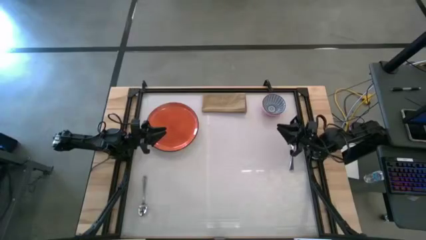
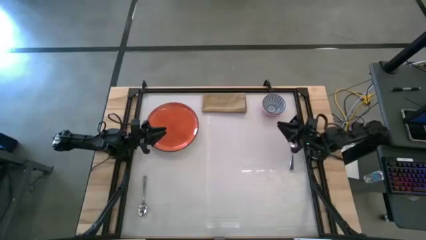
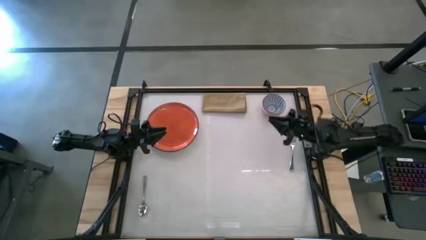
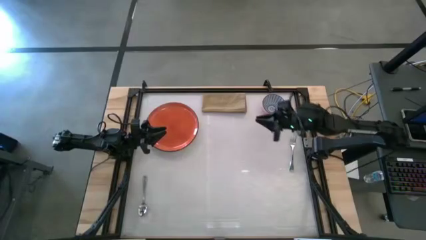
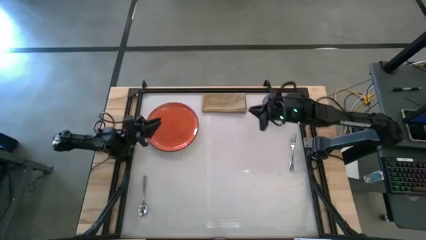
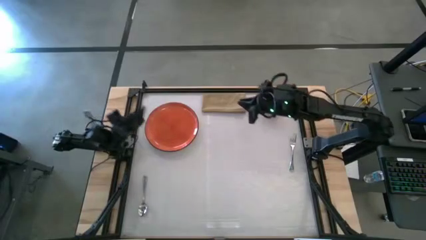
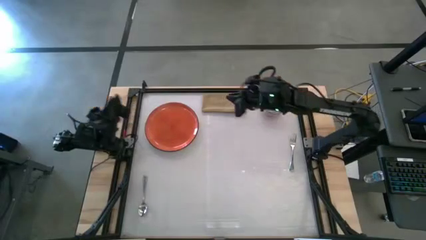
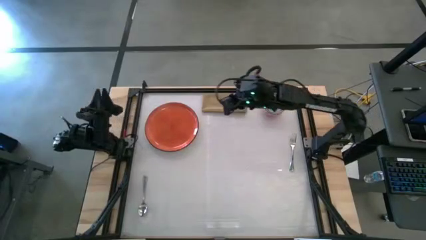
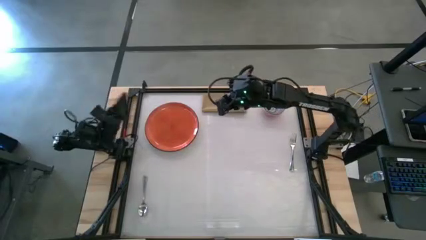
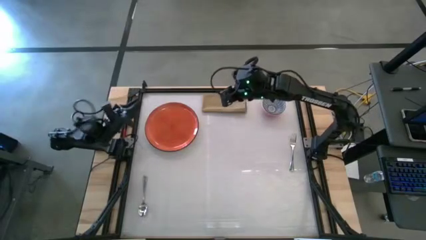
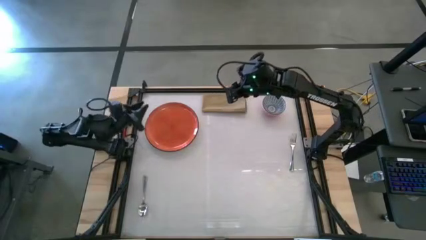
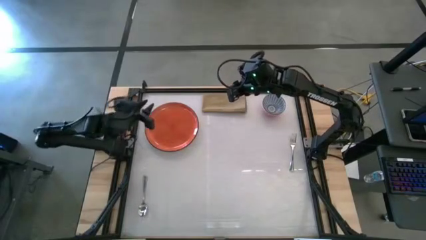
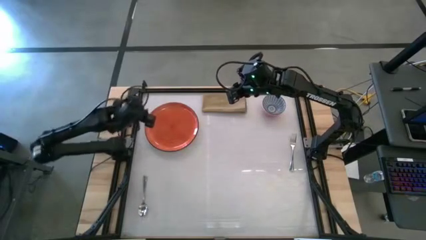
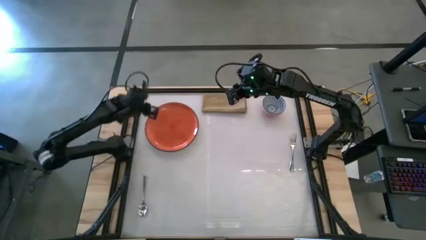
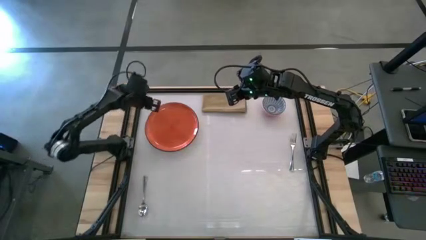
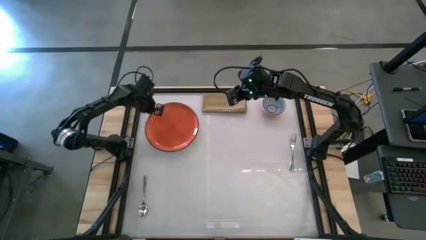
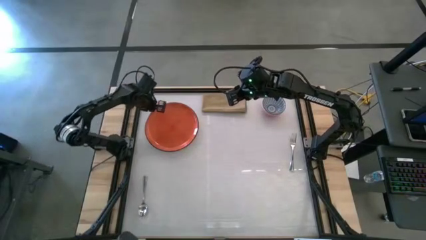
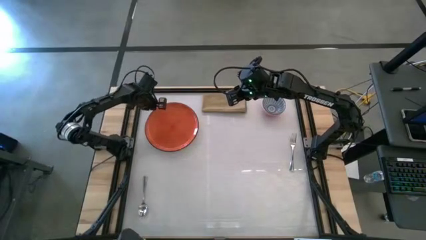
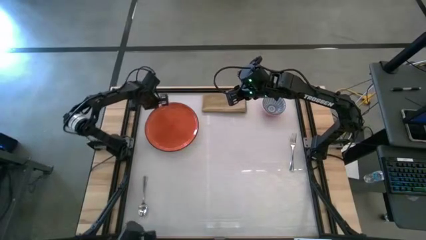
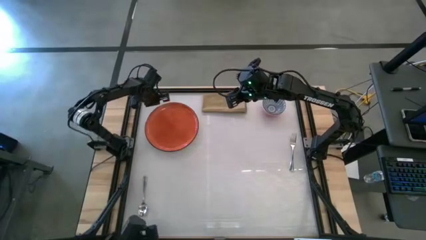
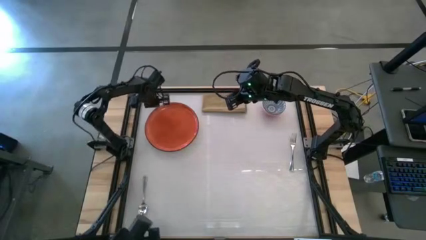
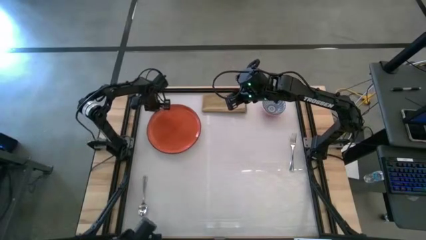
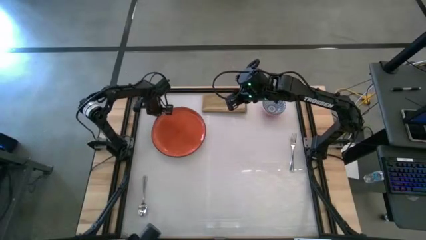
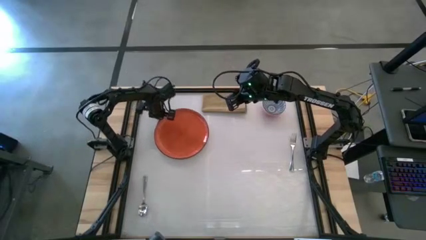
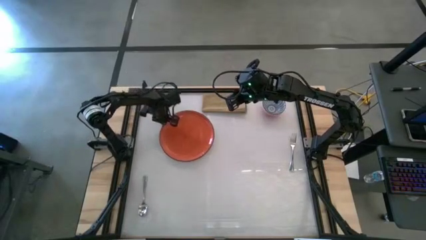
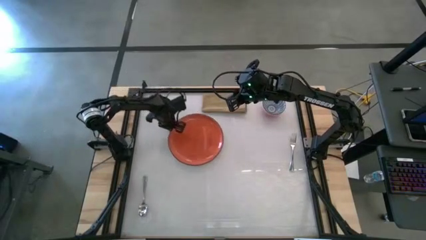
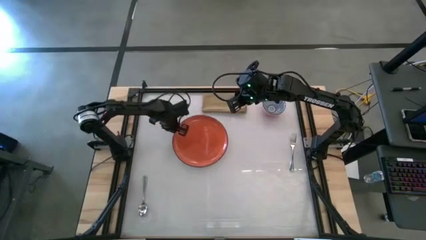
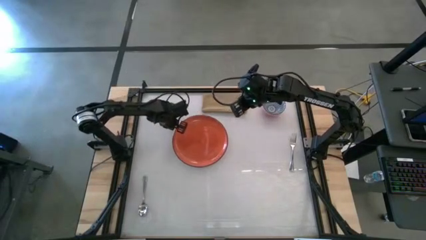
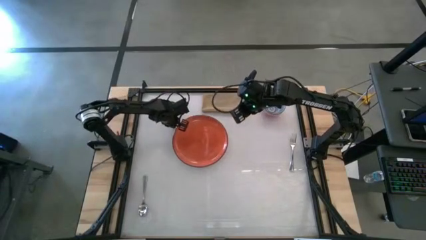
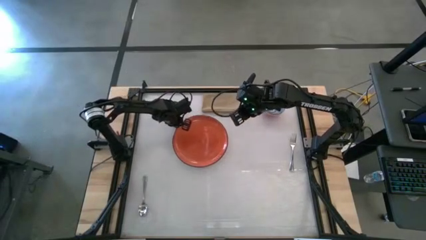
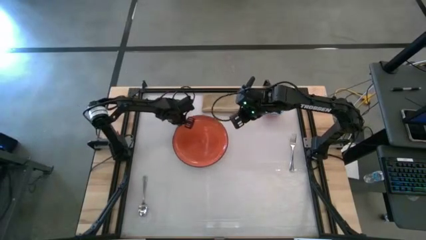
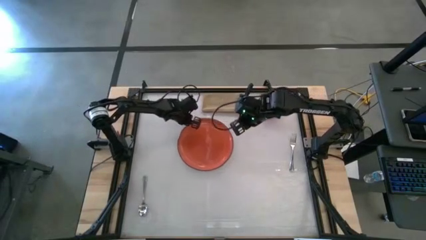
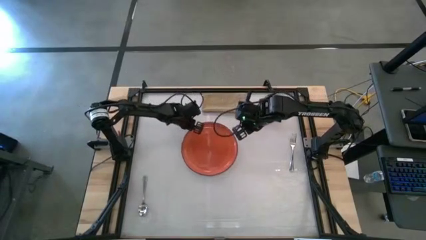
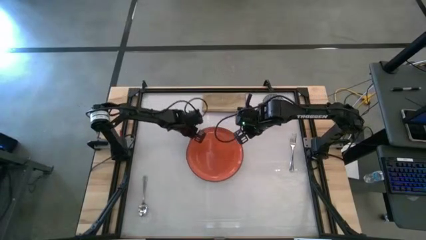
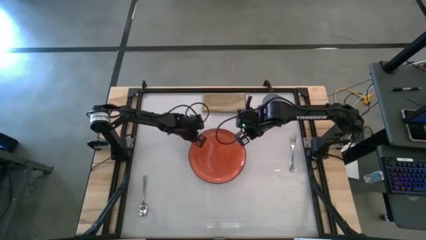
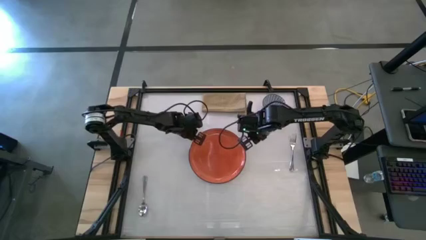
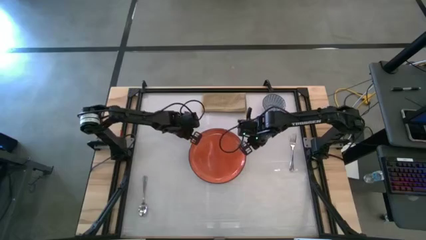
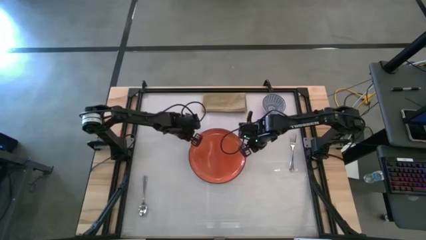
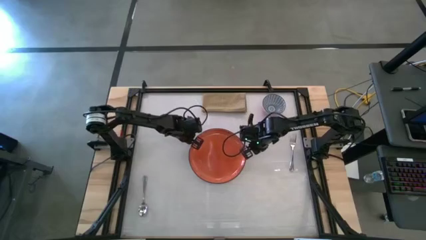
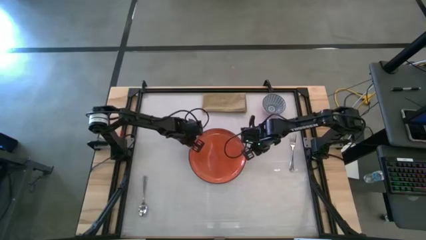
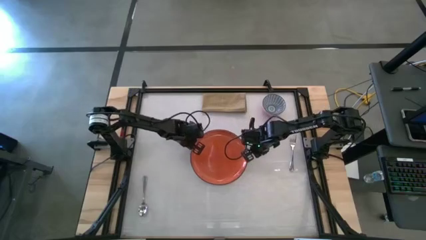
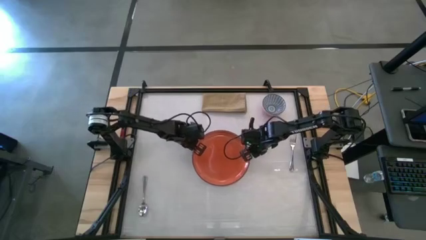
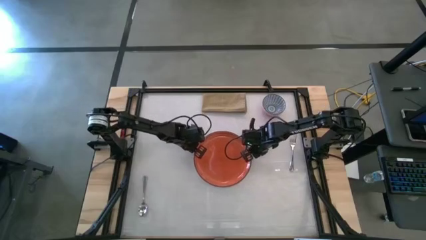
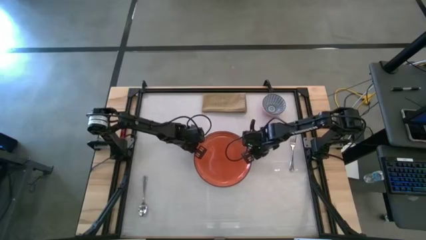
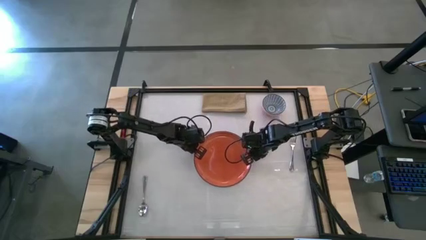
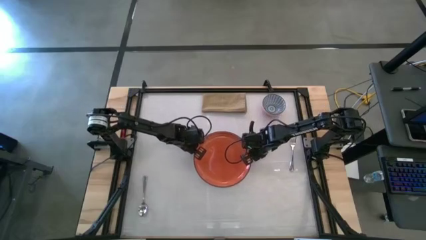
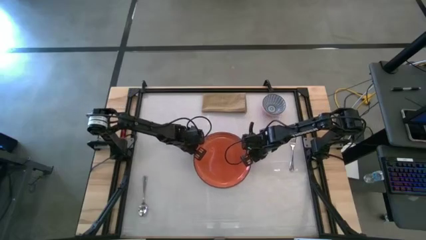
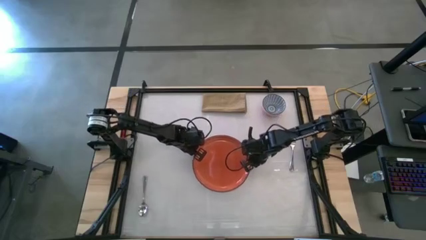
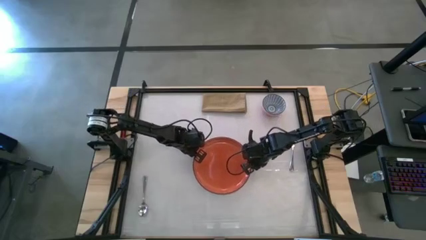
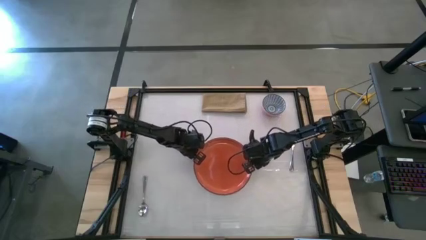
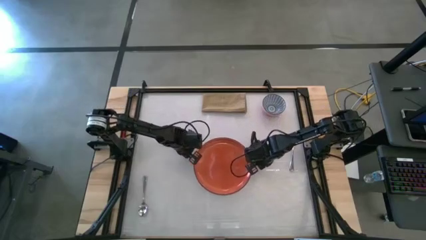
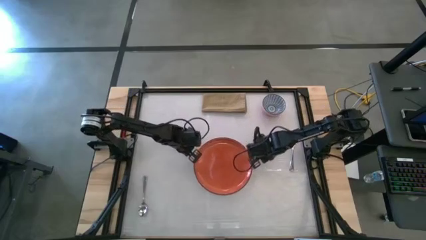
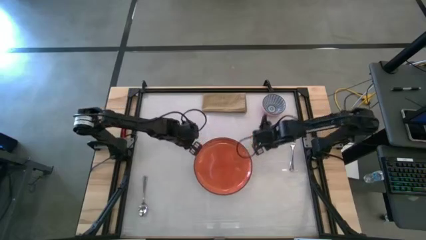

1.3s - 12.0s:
Task: Set table place
Move the orange plate from the top left of the table to the middle of the table

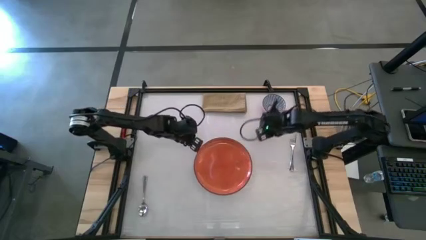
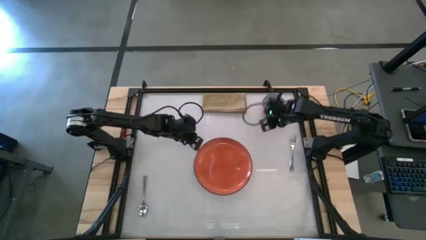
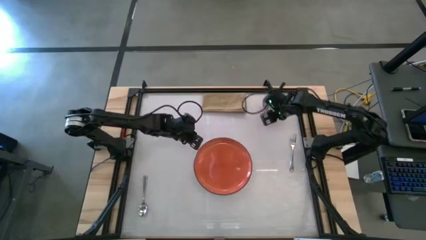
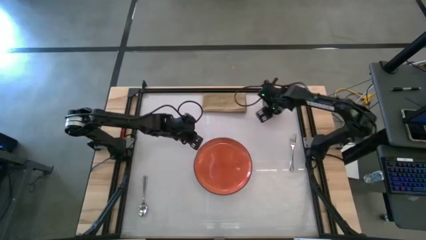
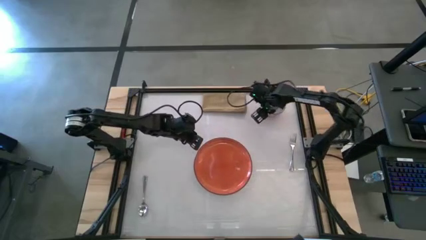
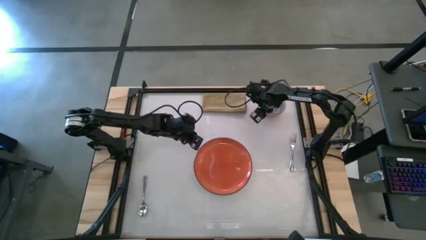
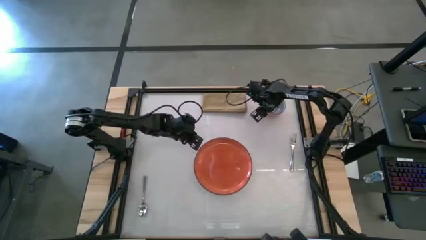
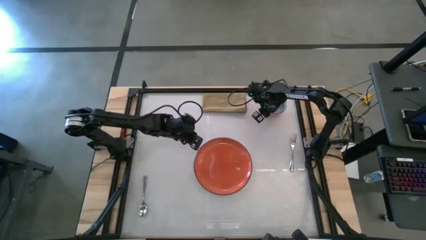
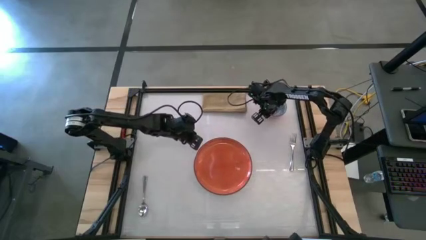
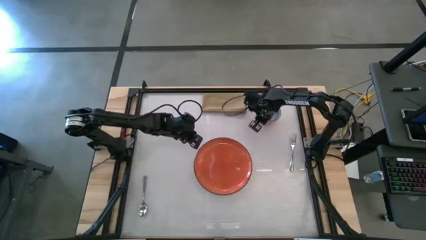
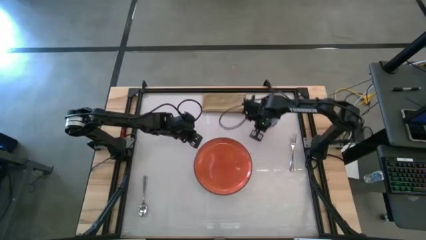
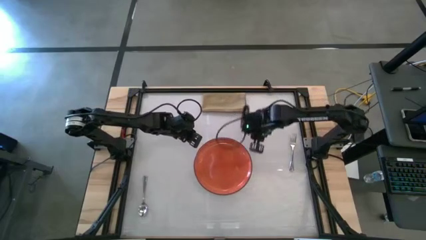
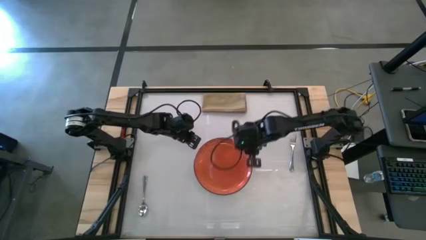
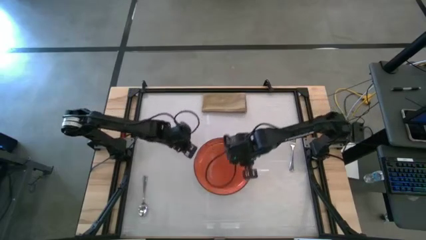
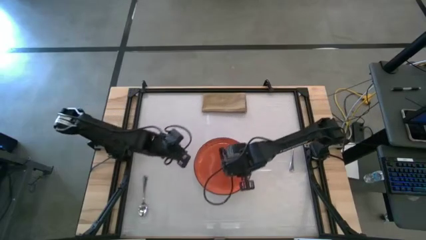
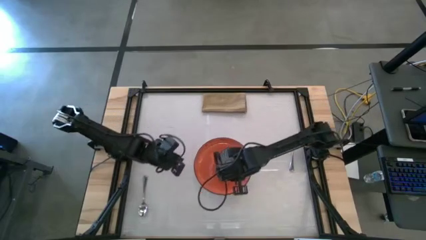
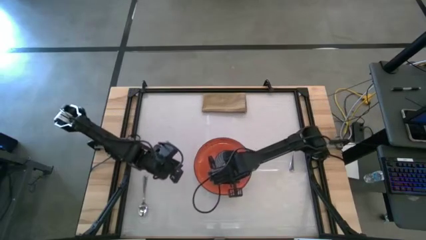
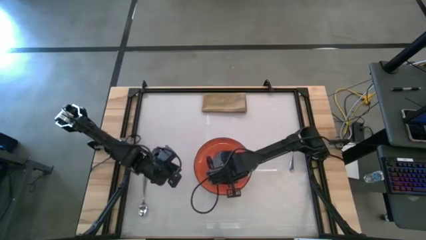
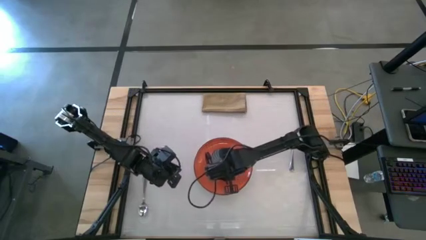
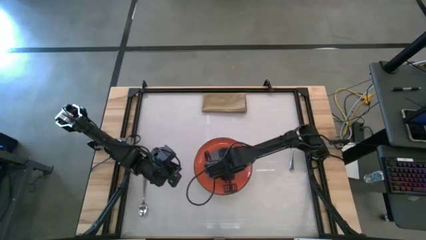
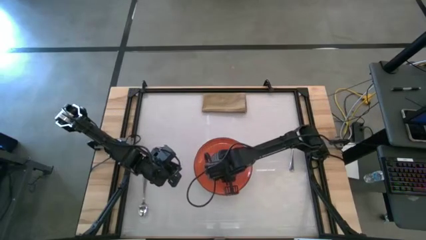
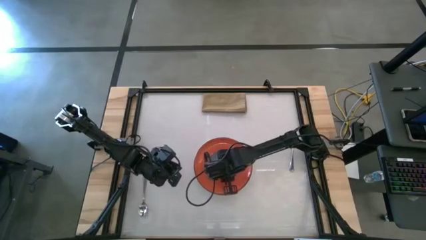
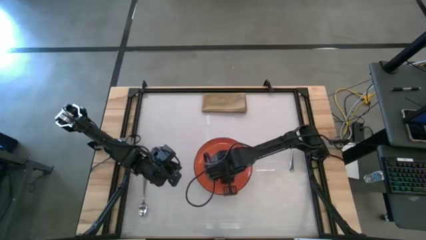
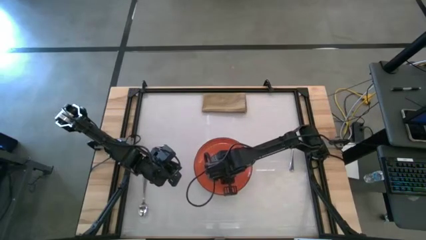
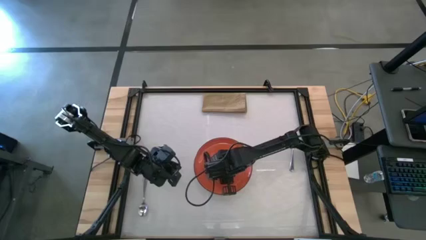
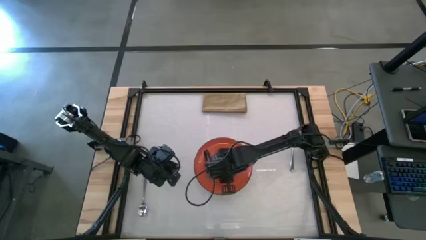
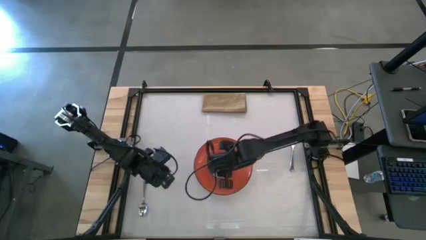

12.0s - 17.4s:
Put the bowl on top of the orange plate

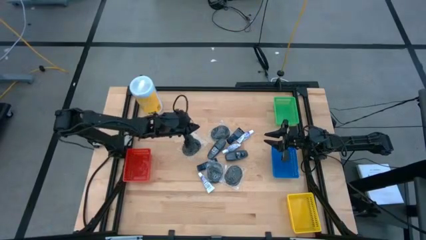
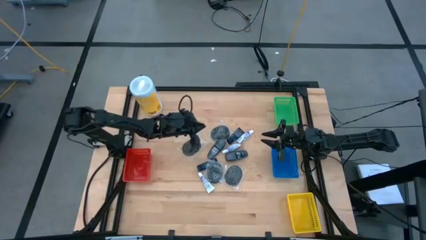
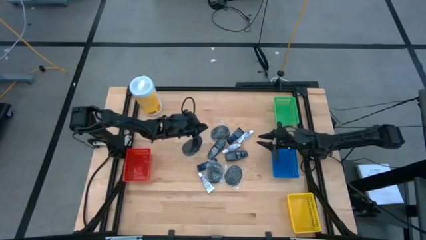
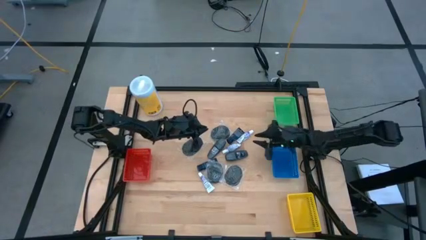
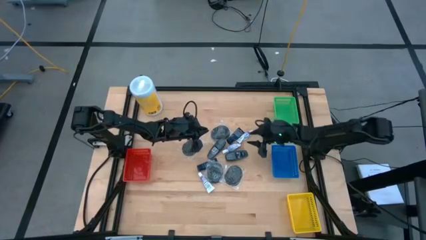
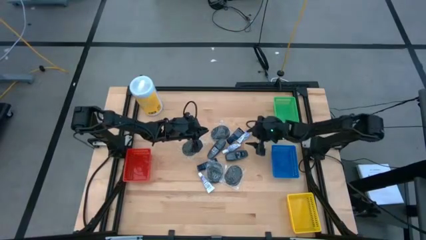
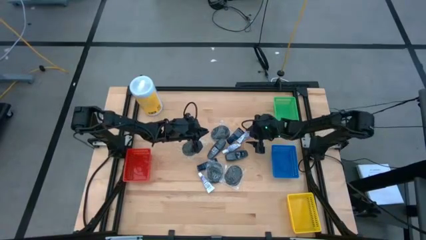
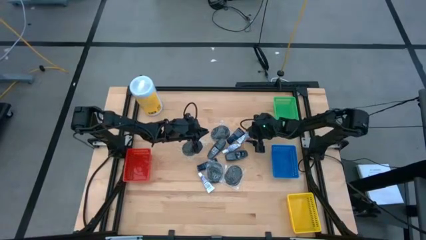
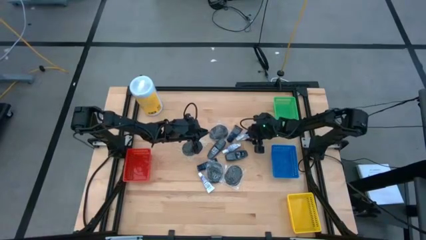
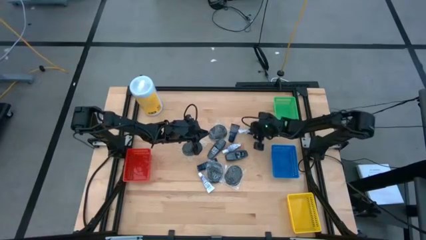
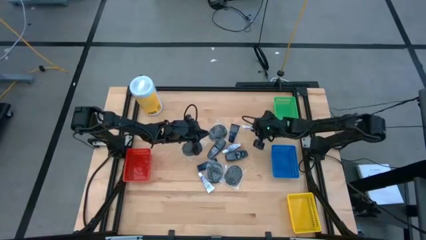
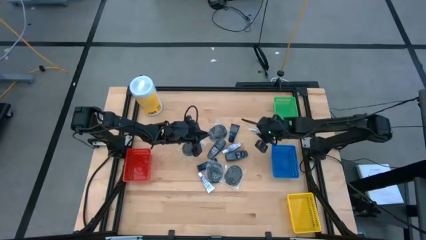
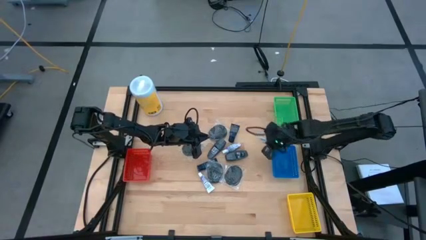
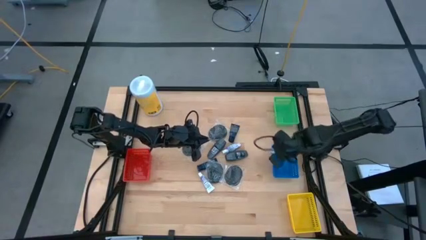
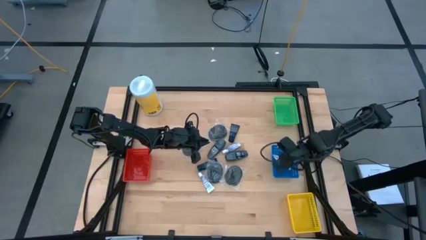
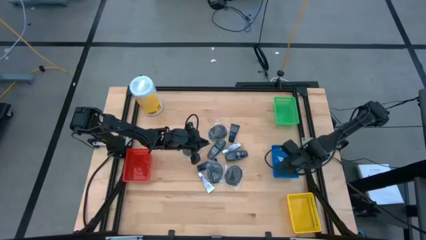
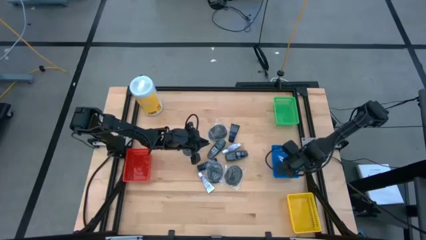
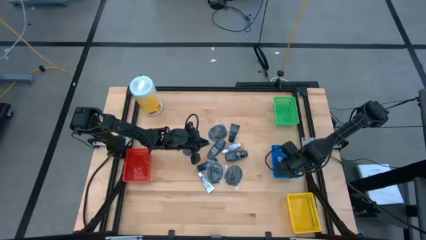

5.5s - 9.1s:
Task: Pick & Place Travel size toiletries
Put the toothpaste into the blue bin
